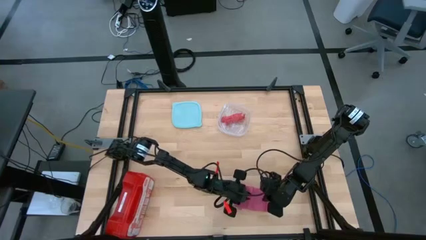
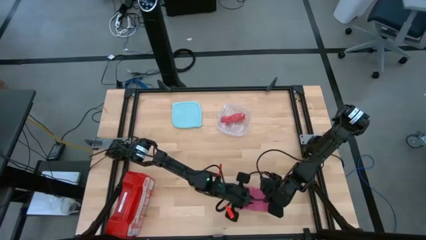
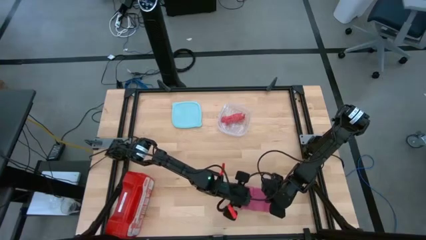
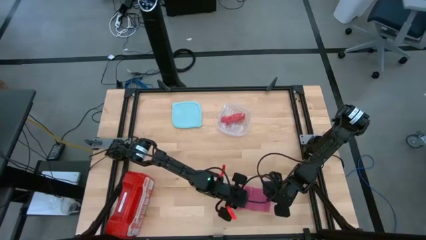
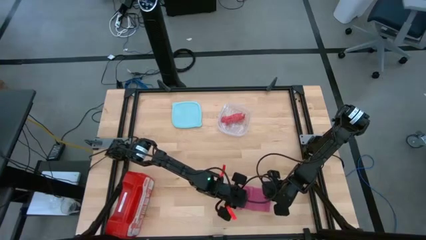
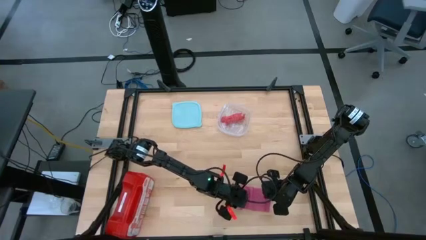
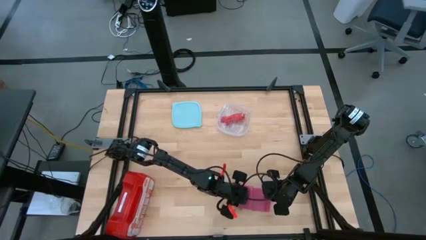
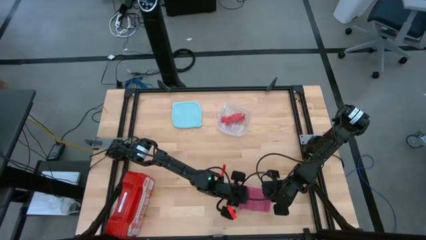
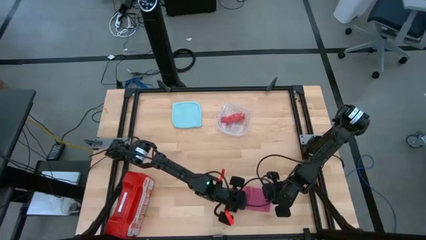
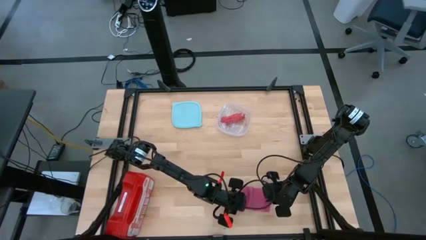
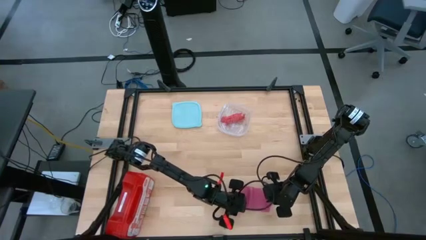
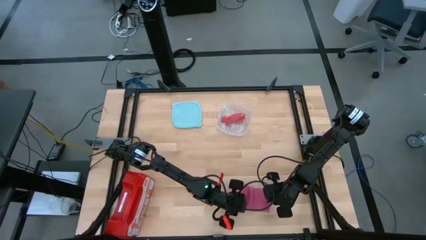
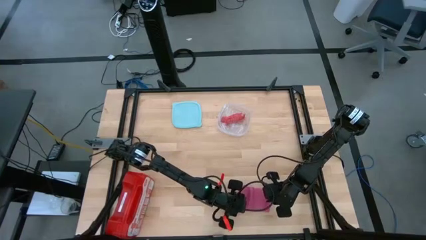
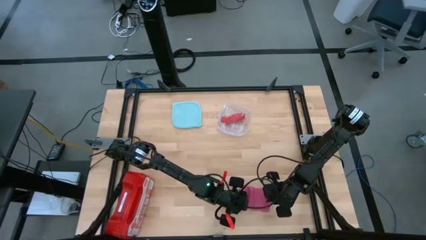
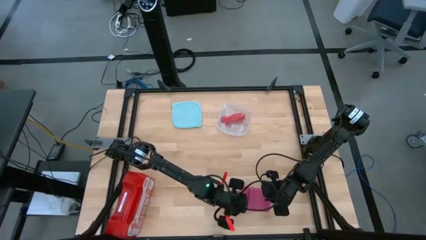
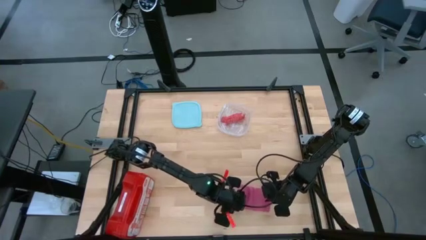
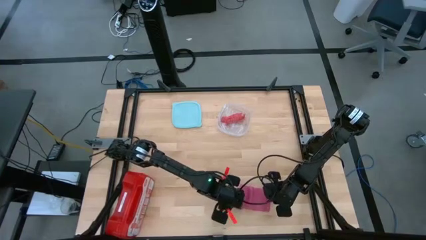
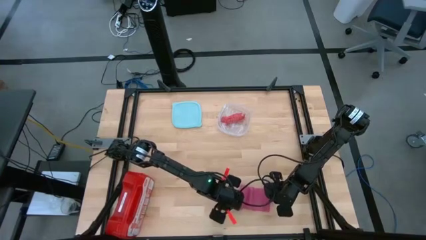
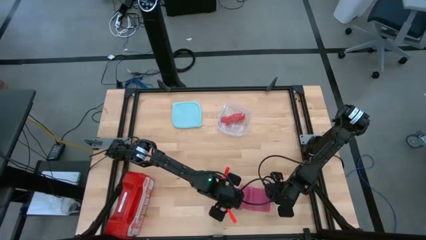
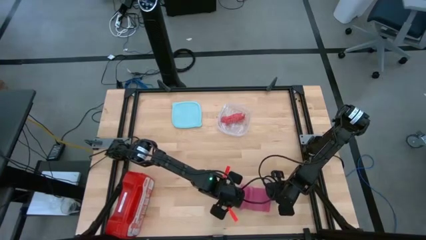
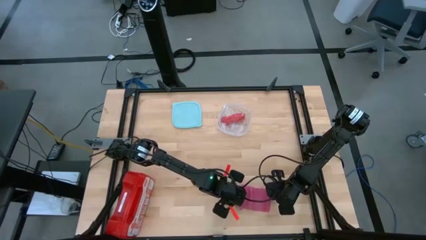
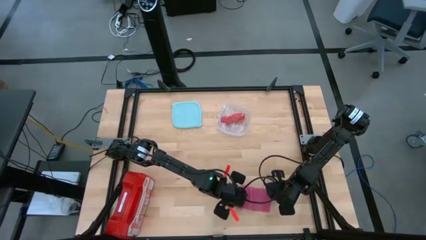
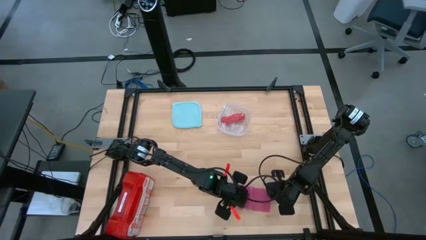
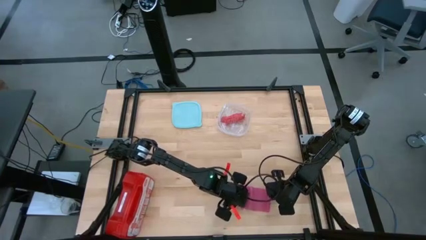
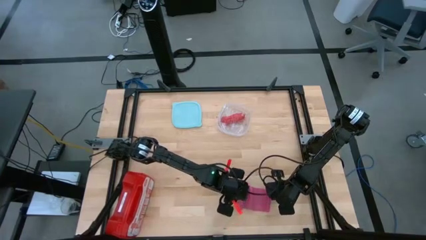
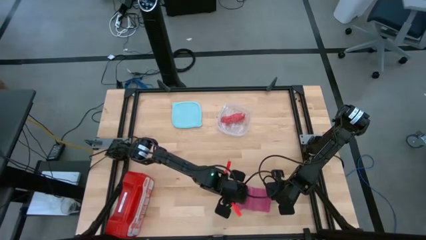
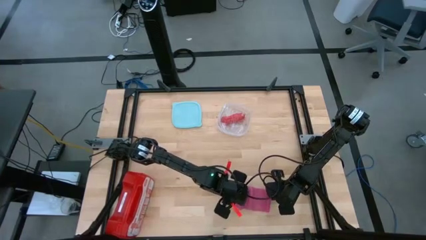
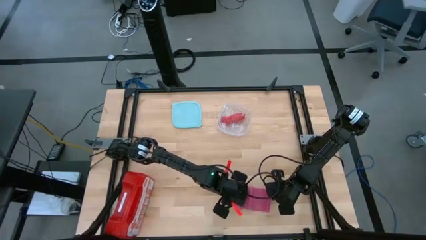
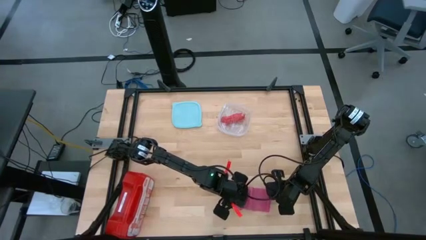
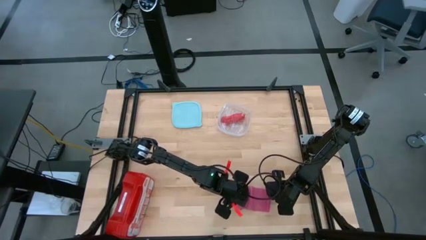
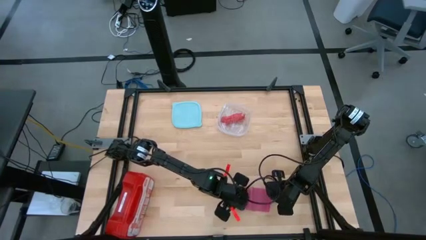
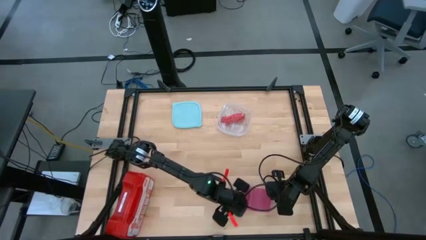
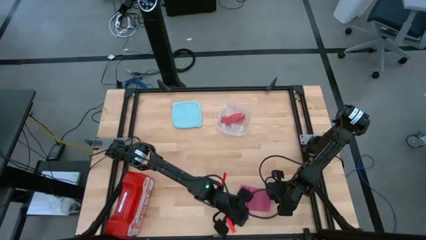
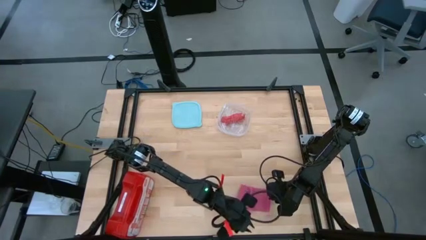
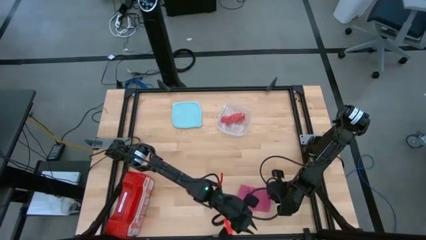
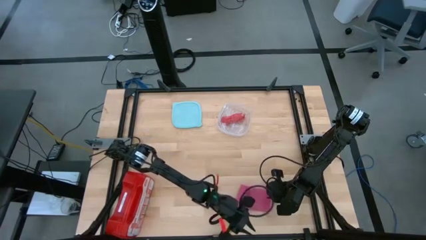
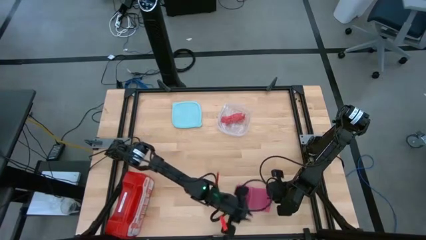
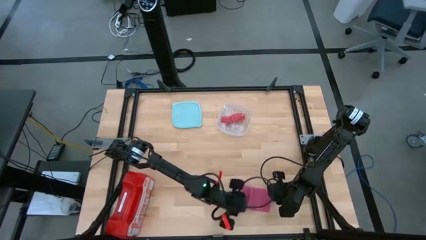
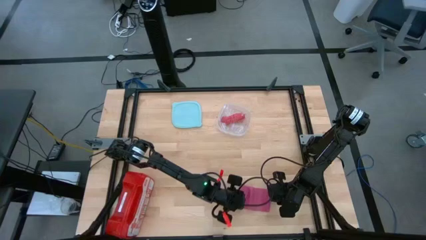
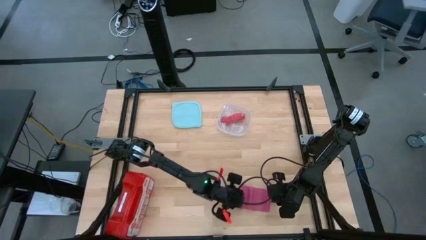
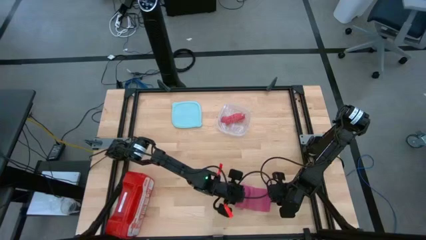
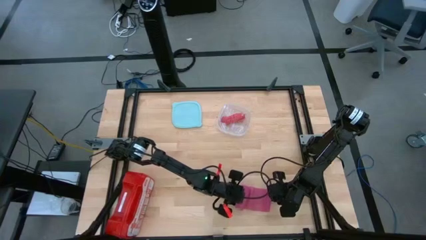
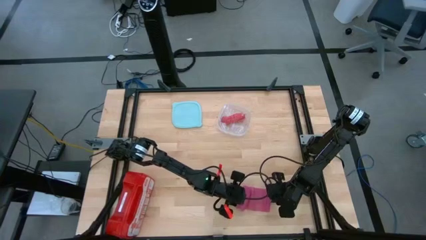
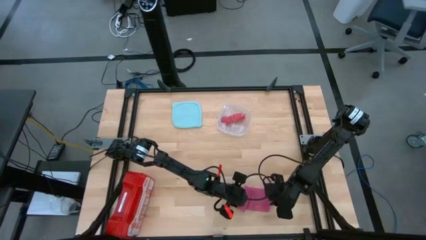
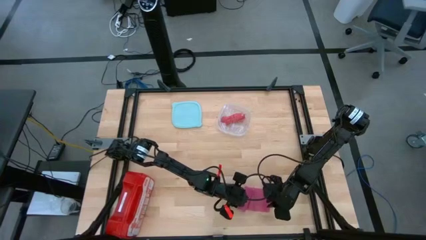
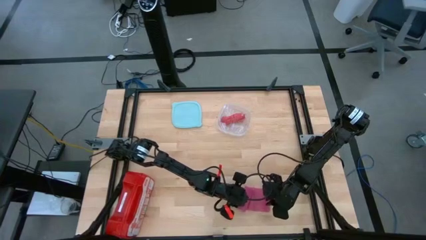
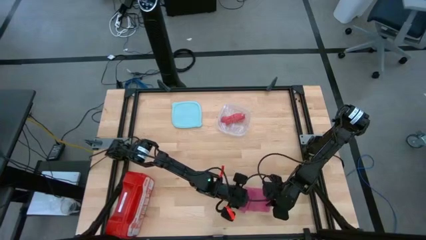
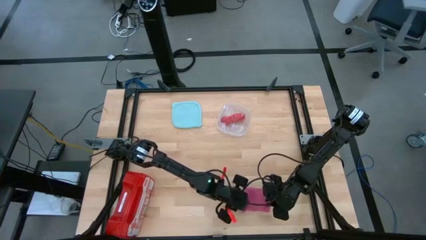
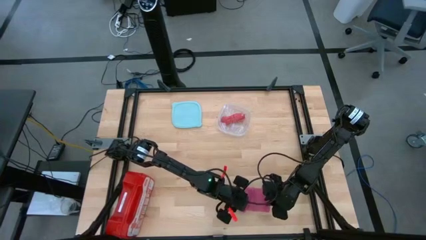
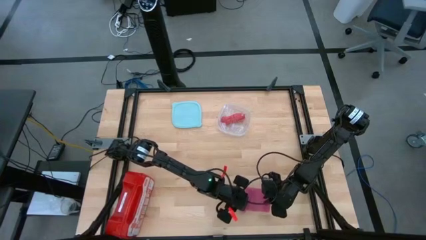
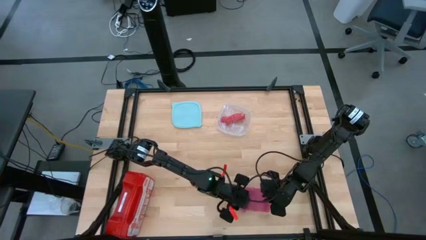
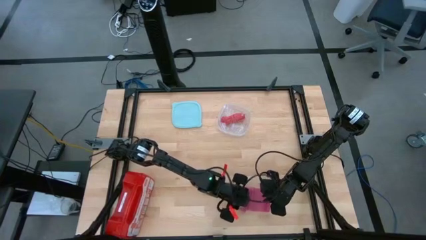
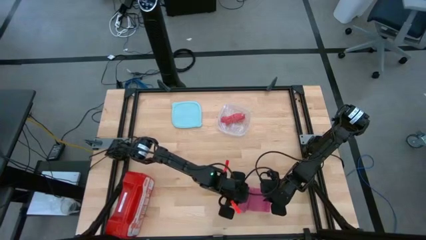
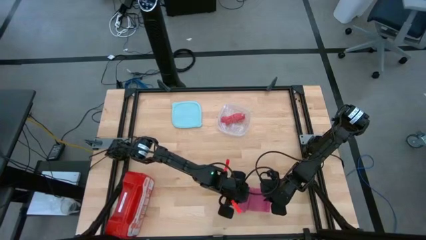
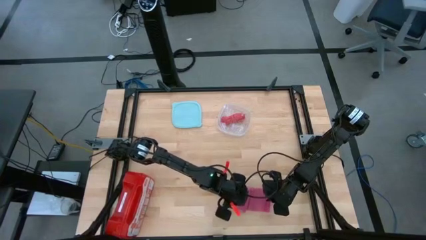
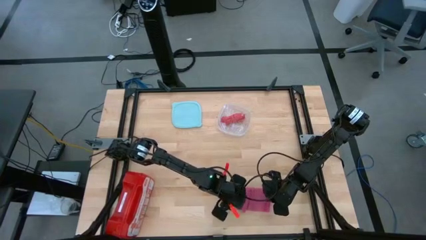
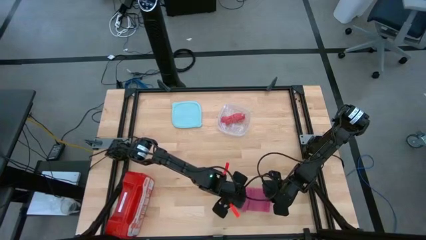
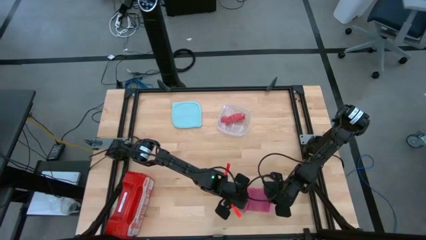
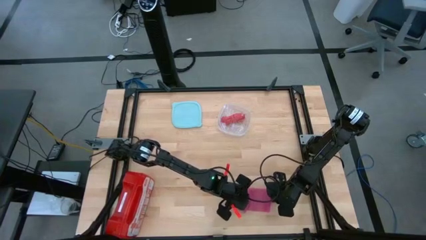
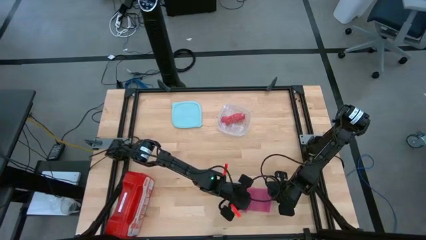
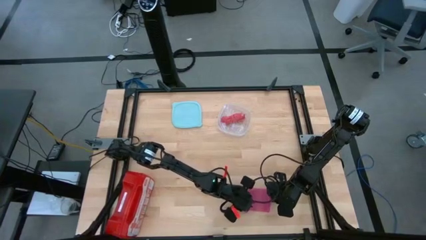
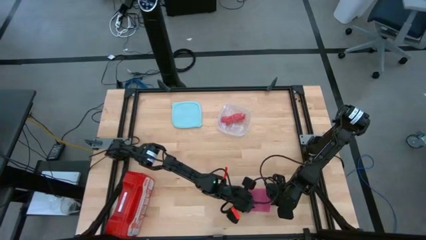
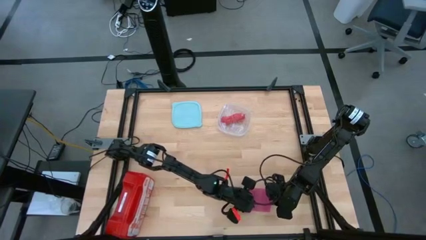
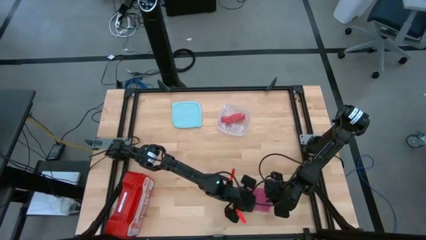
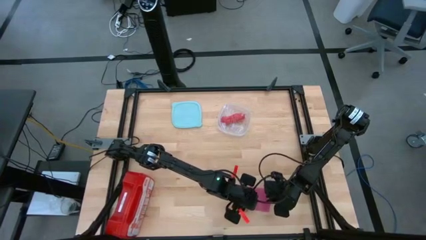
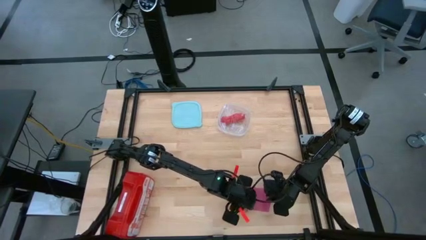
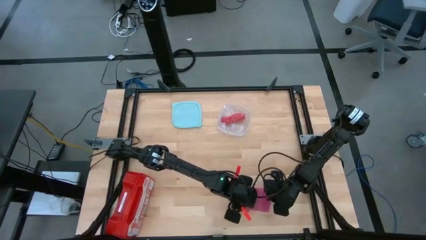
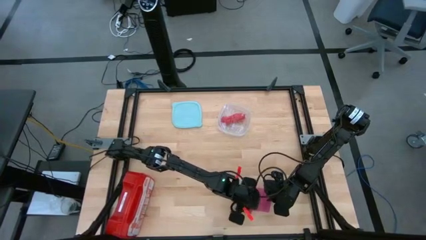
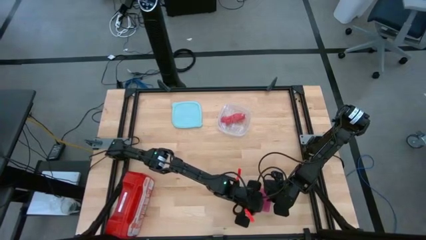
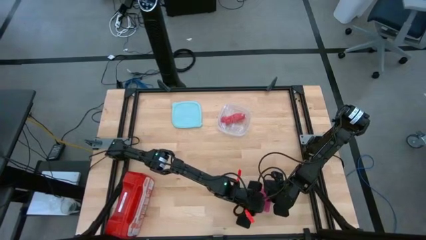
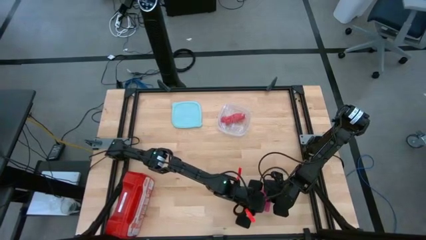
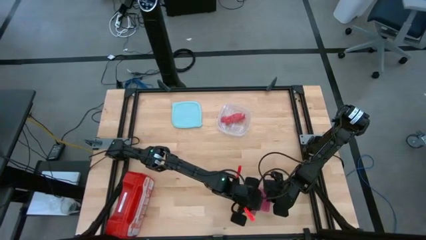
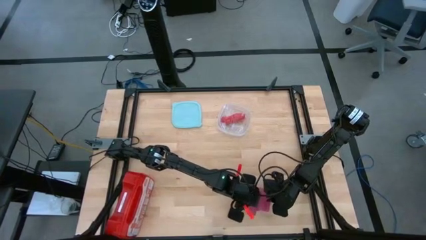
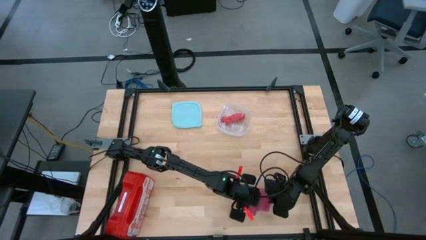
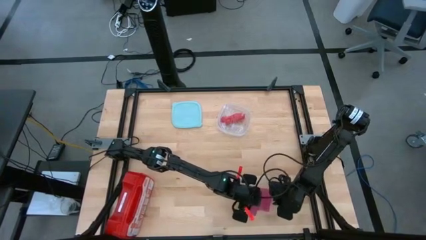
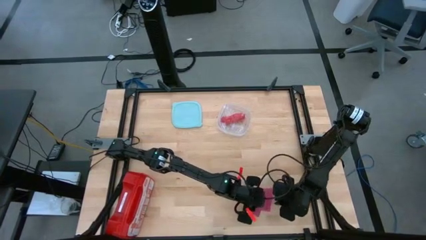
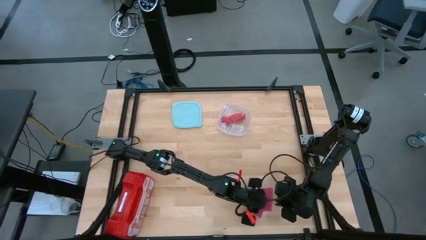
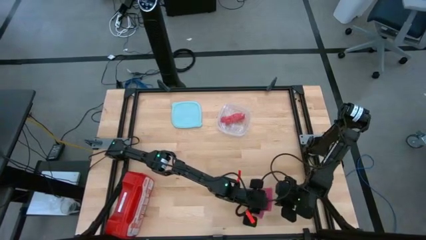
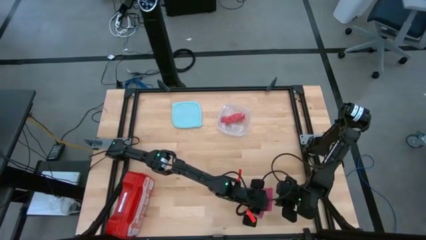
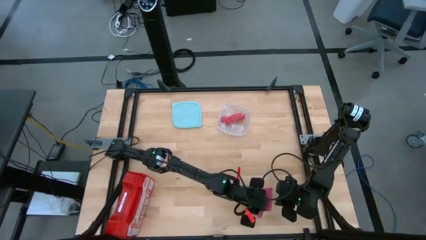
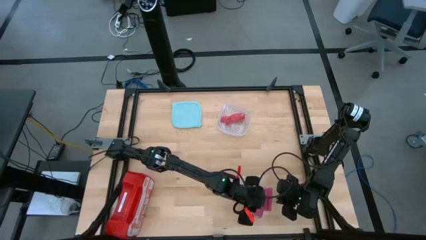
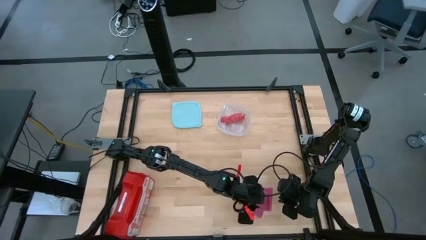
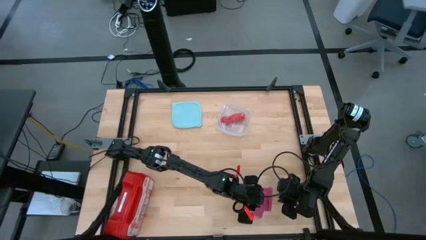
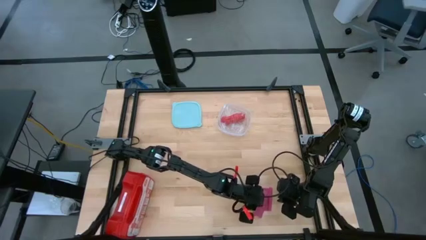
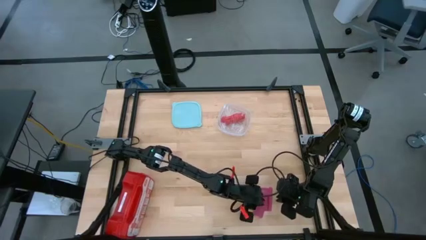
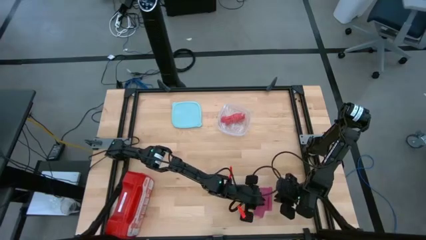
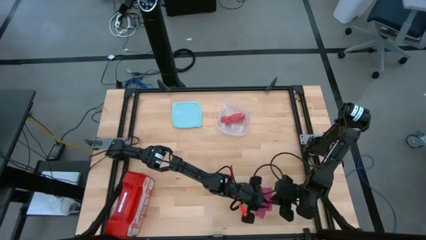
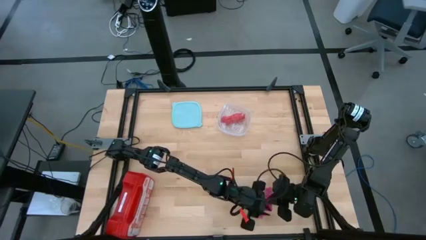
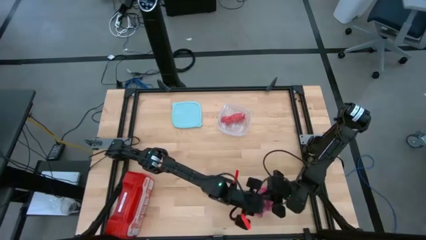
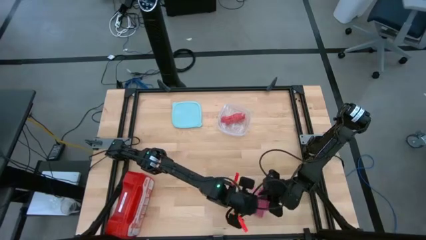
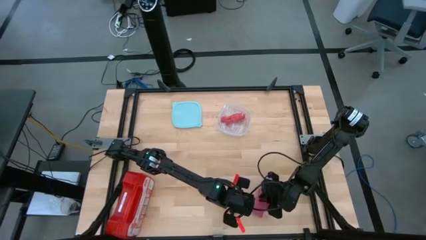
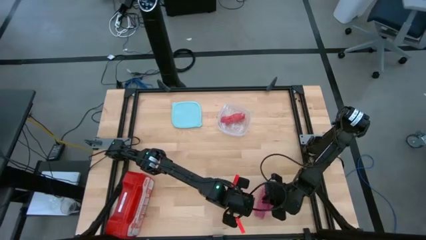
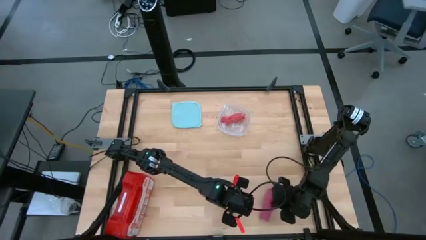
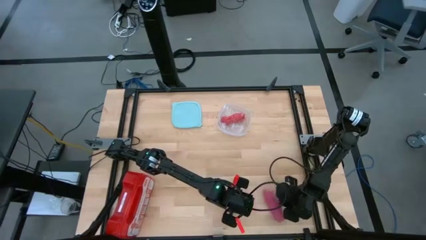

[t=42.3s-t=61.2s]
Task: Roll bandage
Roll the pink bandage
